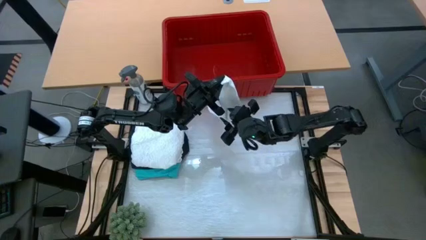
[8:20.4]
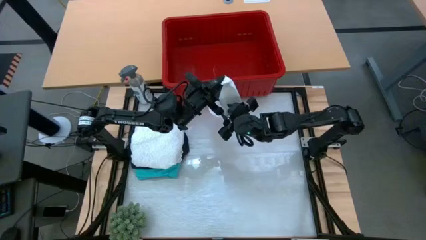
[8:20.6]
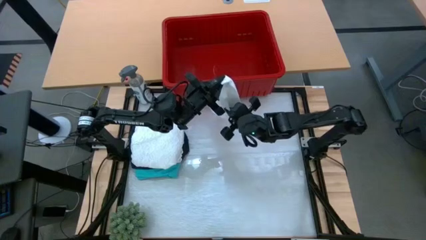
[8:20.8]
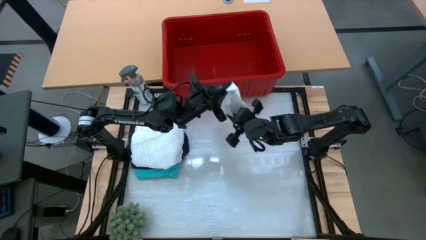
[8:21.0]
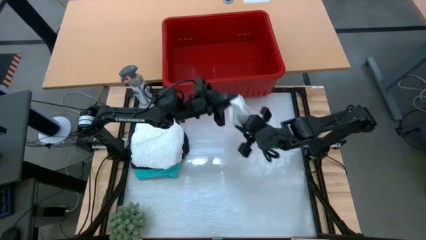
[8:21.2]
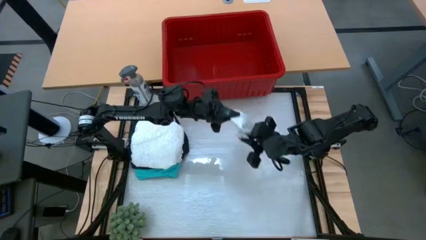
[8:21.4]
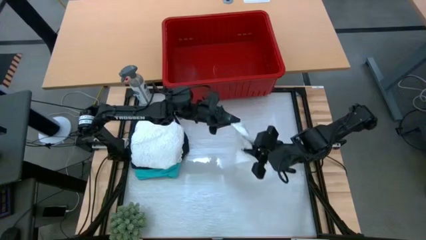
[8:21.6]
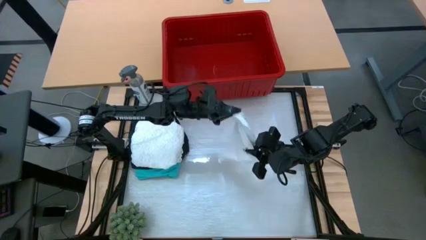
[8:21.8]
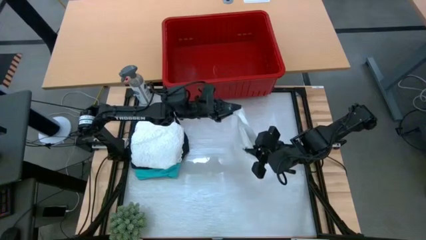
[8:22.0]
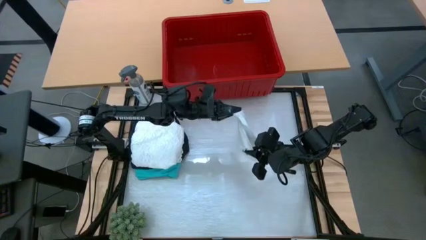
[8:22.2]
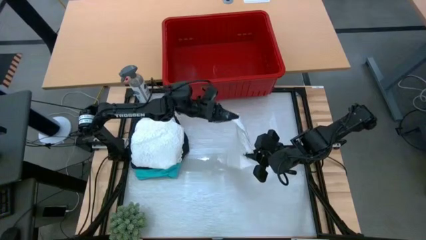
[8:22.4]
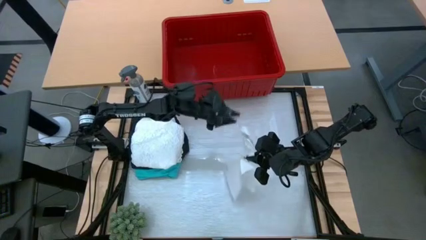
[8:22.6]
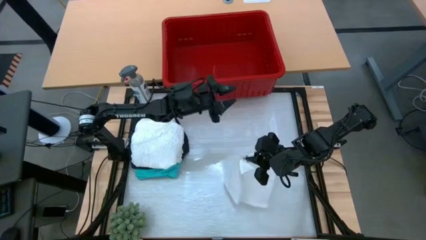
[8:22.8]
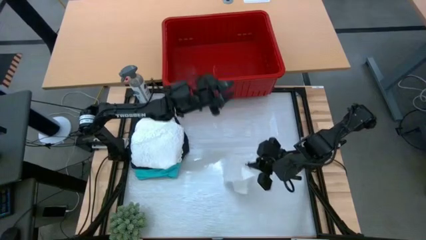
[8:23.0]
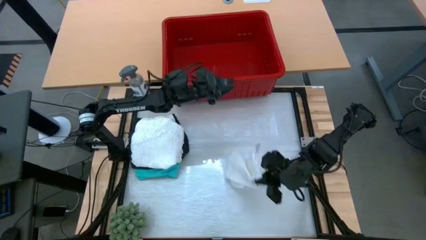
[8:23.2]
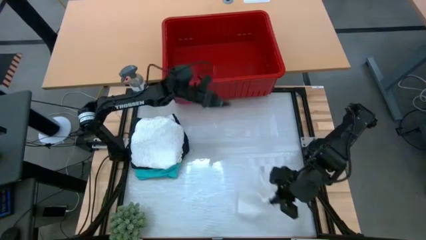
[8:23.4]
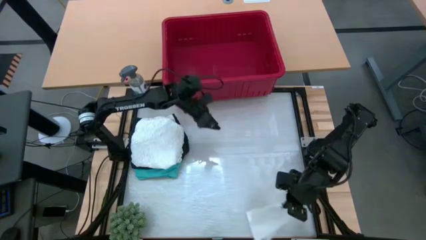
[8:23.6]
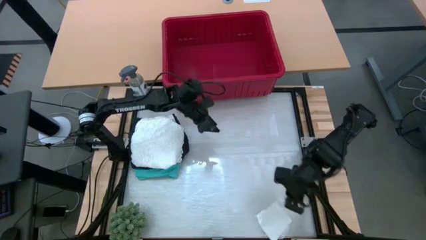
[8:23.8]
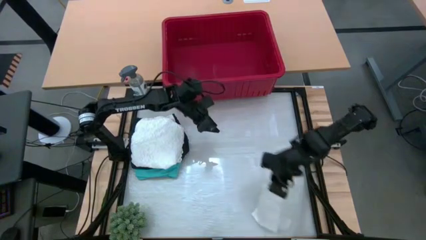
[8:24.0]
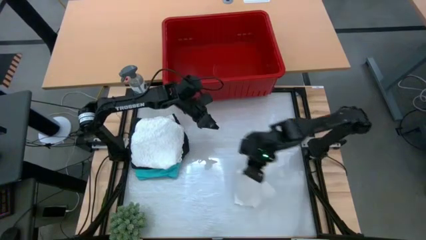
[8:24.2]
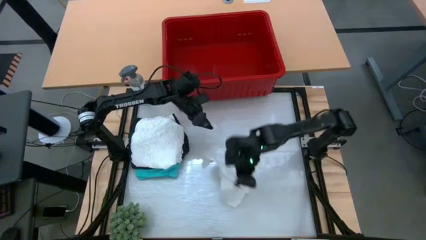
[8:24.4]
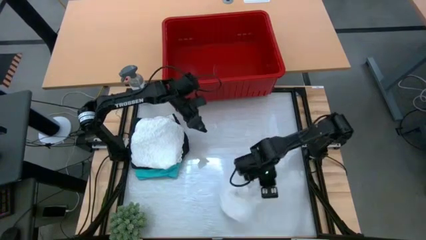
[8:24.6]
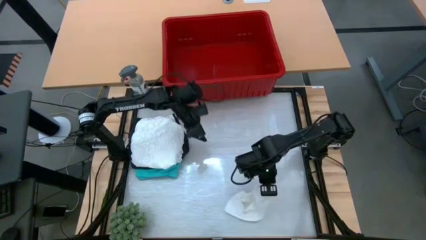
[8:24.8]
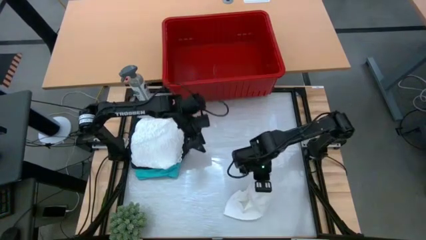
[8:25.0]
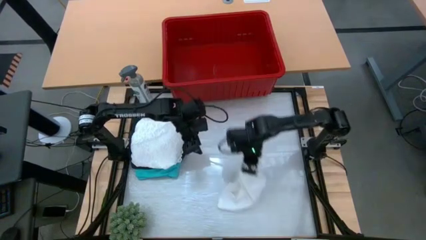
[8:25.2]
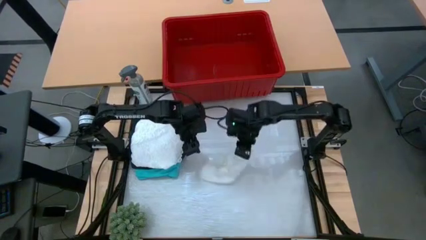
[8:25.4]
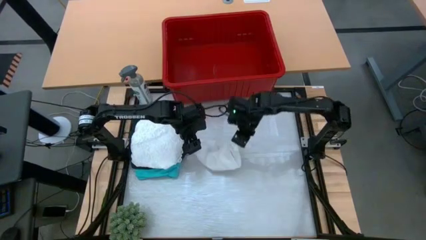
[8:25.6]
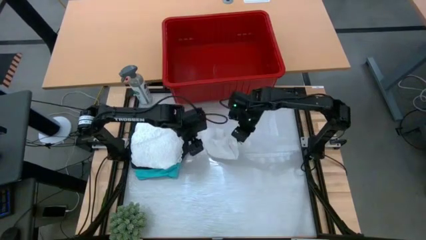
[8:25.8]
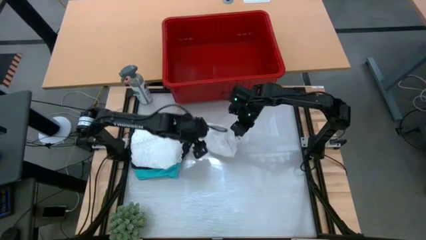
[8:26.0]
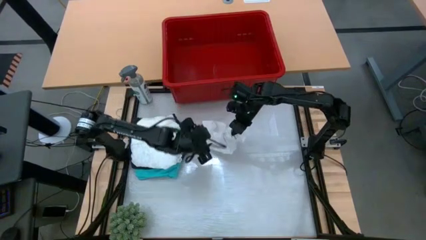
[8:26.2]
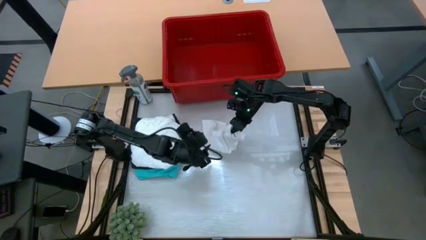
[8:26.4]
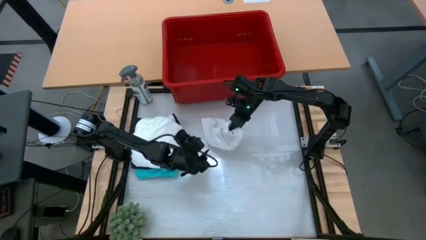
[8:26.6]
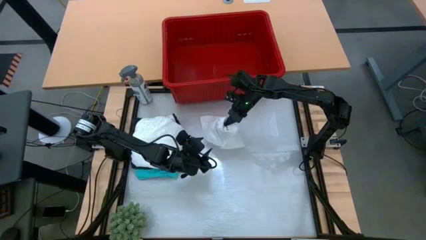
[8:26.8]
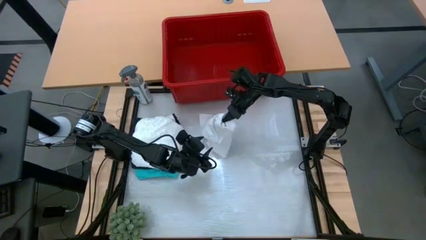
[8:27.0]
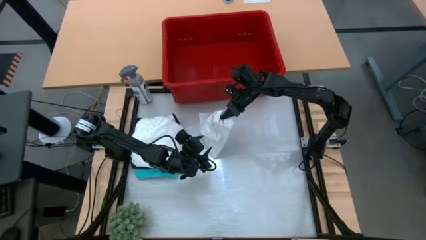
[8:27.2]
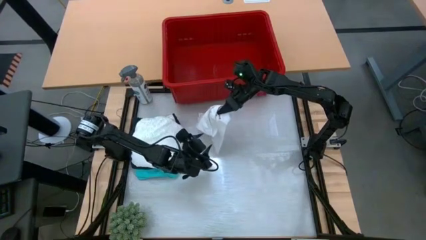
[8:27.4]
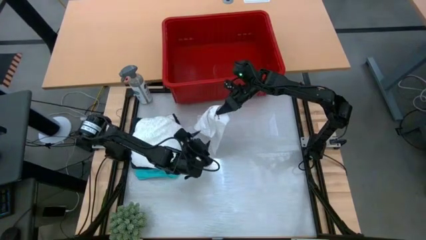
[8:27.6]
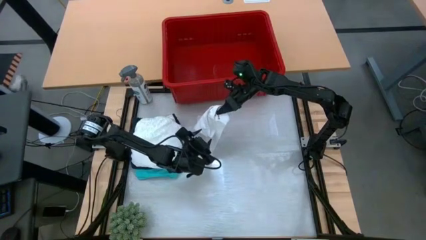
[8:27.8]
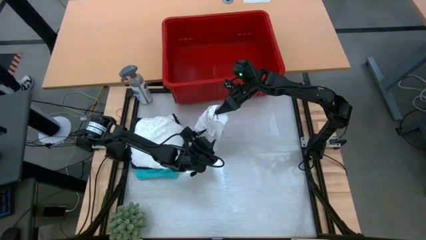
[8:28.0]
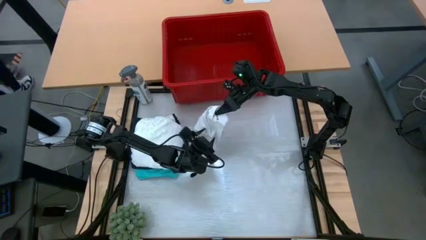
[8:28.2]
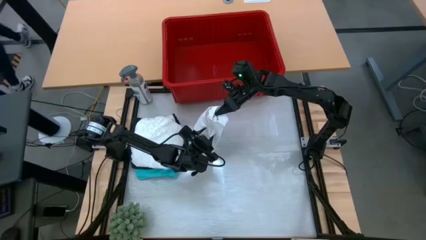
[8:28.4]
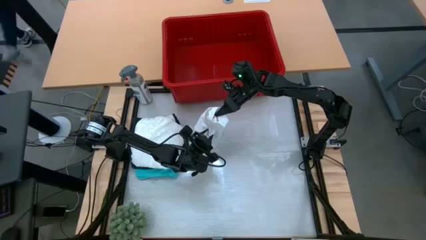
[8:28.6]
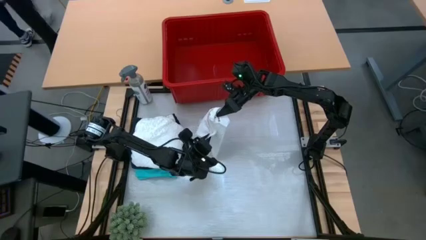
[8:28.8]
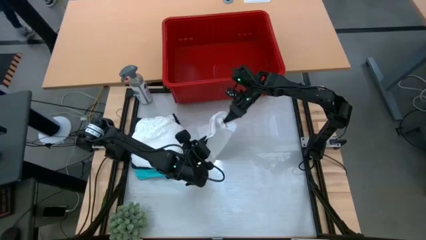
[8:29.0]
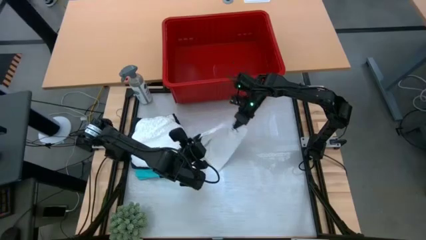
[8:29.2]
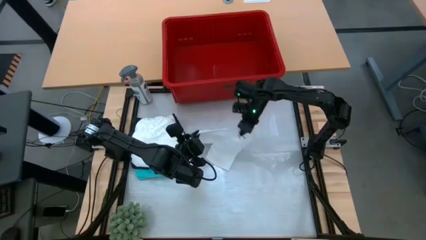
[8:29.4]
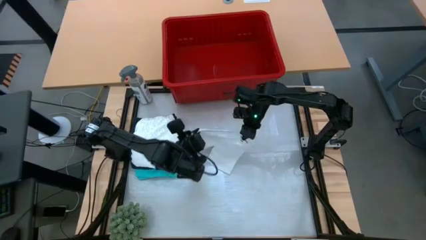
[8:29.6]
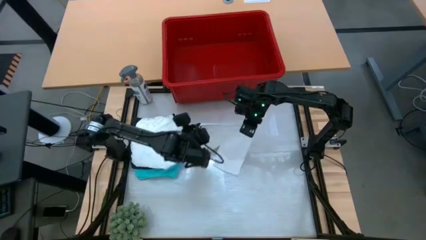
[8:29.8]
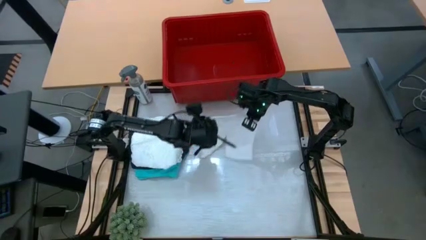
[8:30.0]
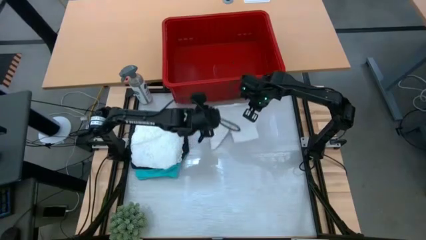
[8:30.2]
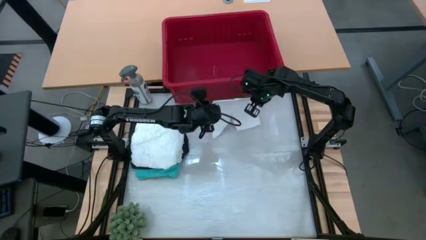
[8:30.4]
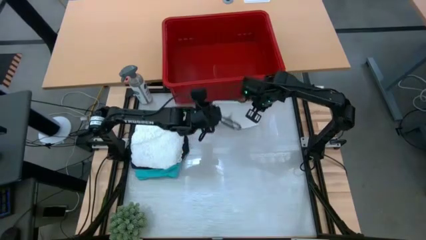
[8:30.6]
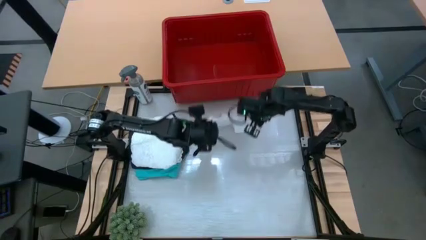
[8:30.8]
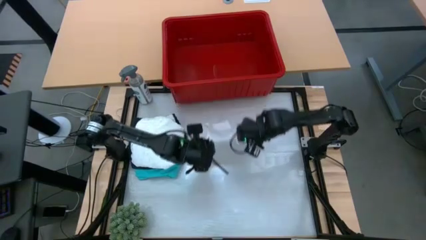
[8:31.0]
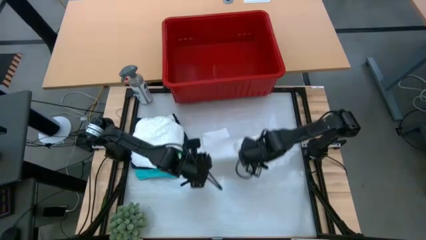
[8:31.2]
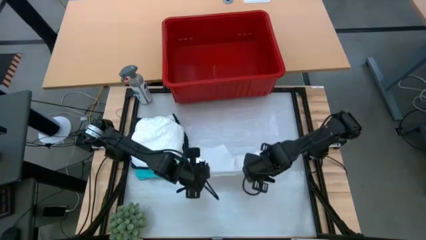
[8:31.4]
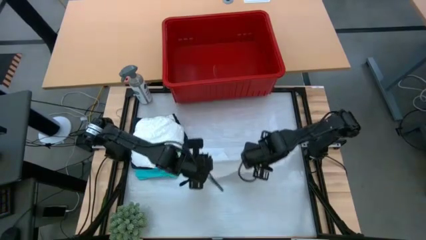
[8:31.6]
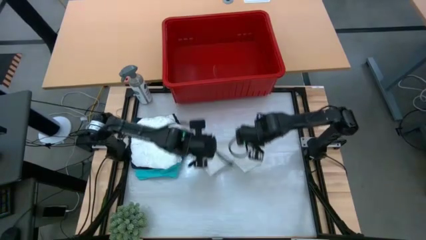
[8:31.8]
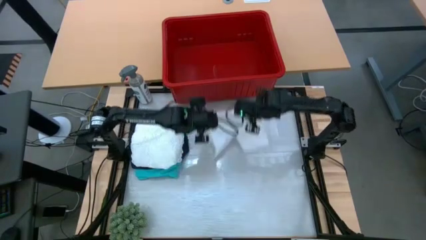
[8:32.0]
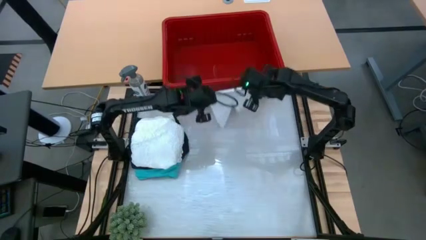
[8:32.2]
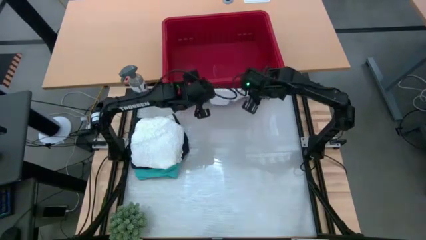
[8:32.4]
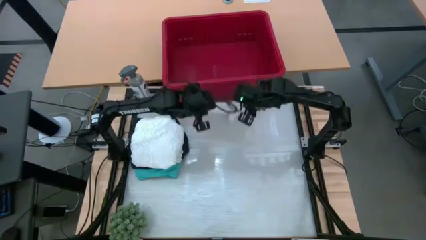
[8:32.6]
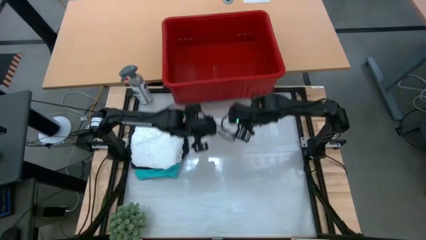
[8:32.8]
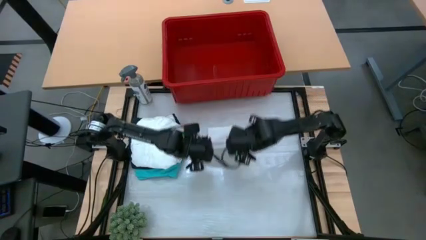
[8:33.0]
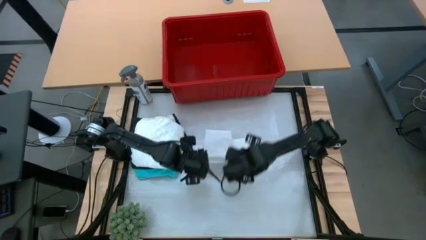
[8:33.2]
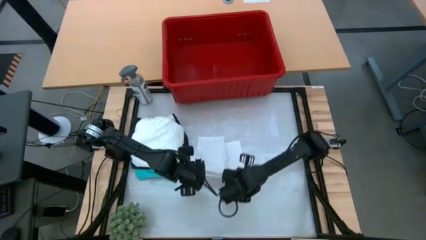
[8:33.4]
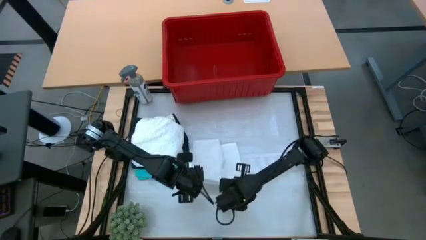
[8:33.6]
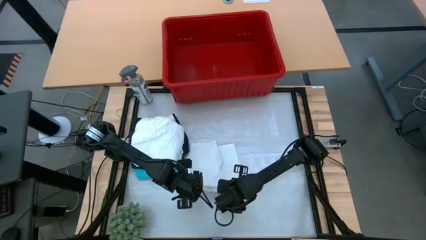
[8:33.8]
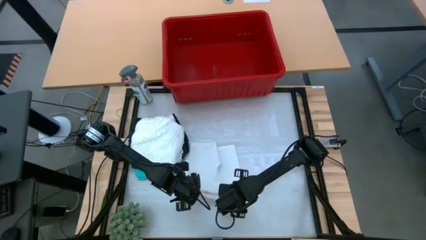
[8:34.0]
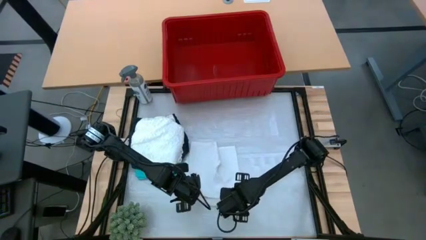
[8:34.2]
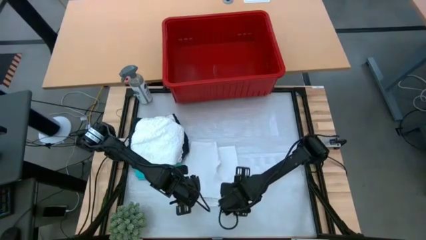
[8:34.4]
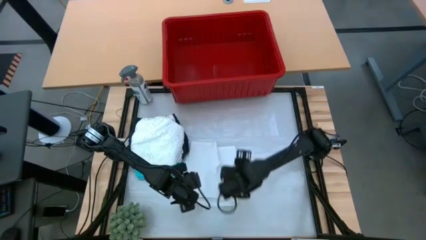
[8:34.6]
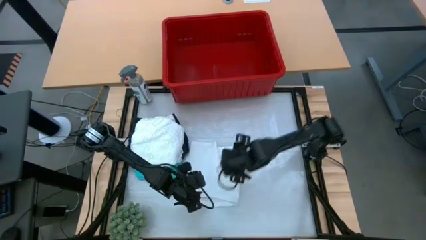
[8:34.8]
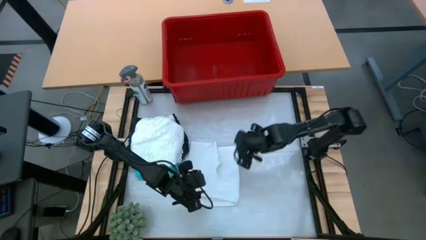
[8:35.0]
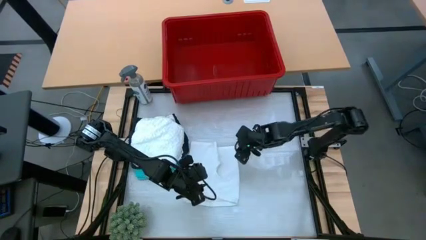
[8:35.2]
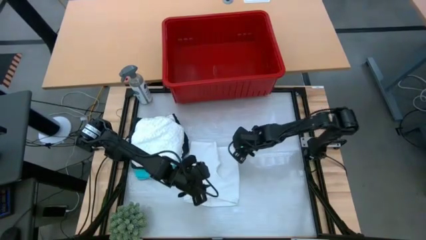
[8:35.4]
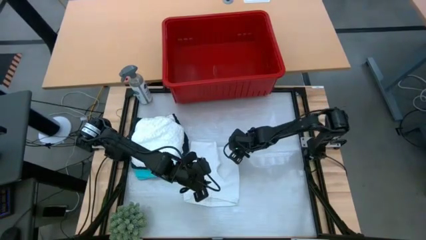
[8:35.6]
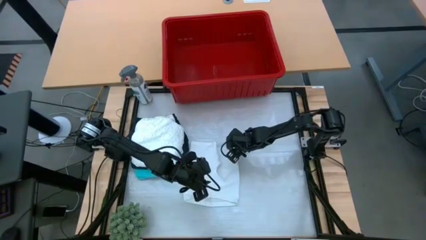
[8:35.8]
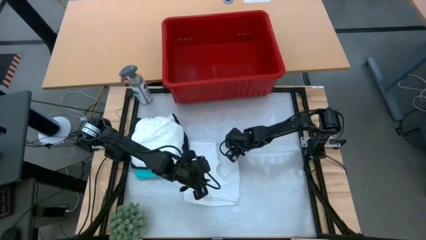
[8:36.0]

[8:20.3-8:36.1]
Task: Fold laundry
Fold the white shorts

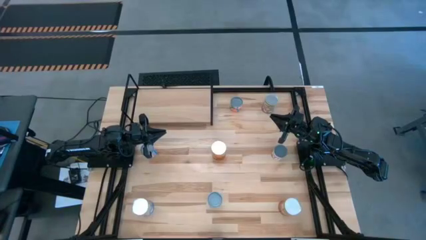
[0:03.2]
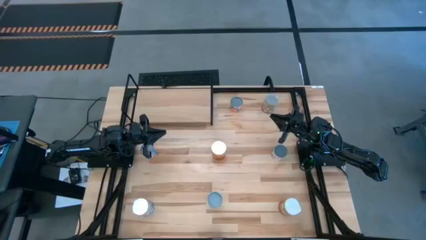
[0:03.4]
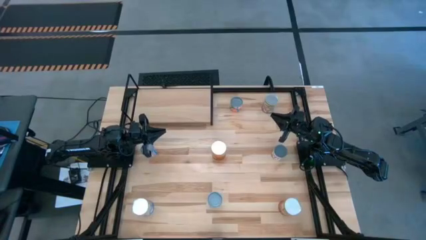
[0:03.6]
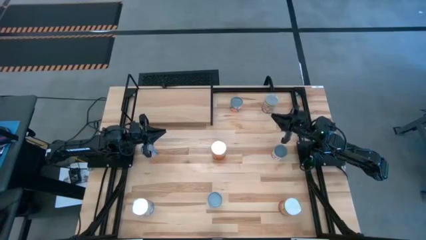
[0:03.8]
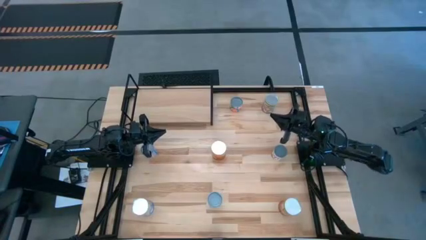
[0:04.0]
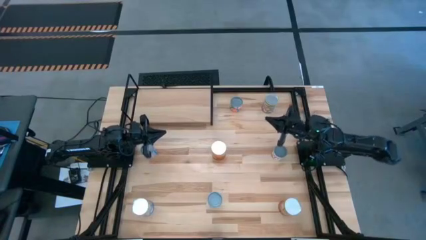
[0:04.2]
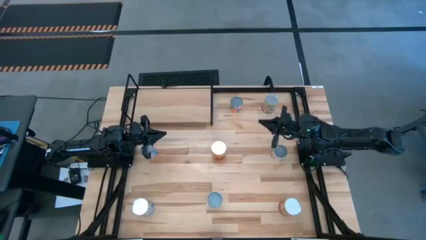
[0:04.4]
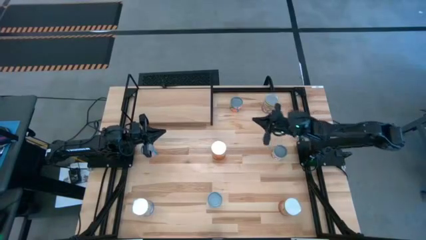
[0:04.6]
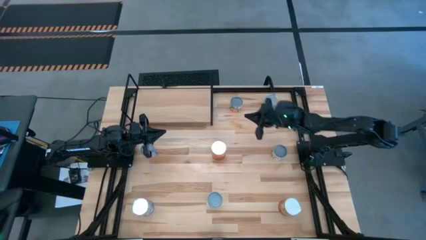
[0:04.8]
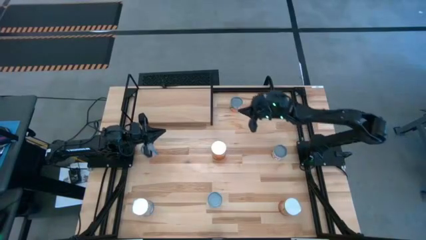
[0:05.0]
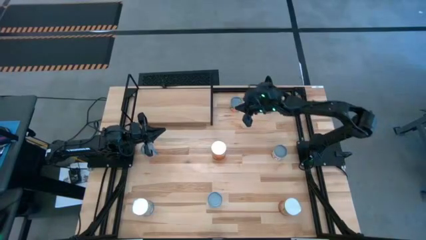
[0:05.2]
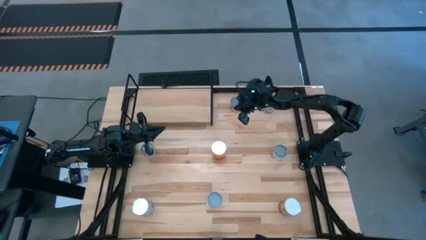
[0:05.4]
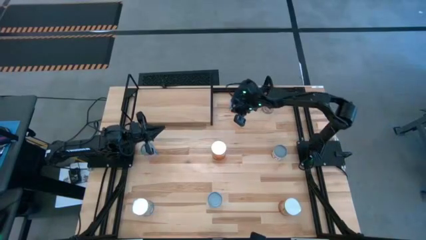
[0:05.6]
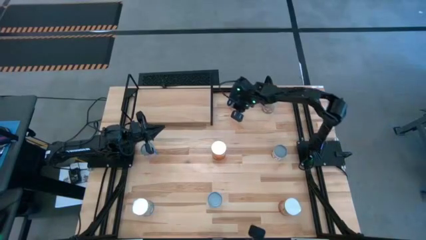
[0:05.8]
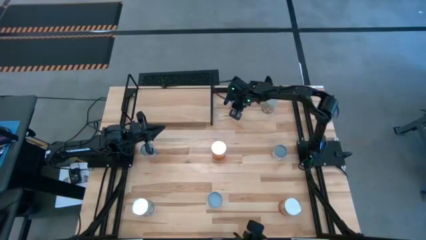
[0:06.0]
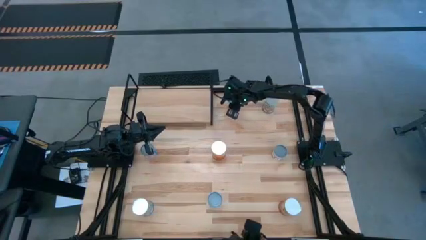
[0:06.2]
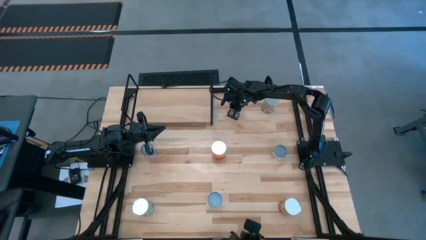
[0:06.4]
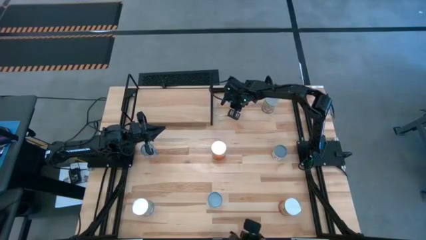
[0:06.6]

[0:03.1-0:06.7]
Task: Pick and place cans onto a shelf
Put the canned oranges on the shelf
